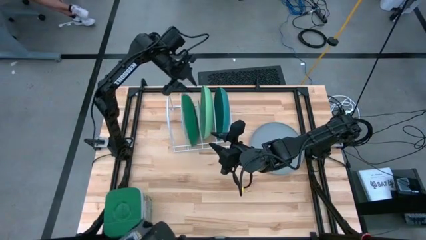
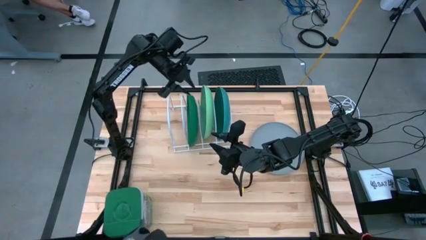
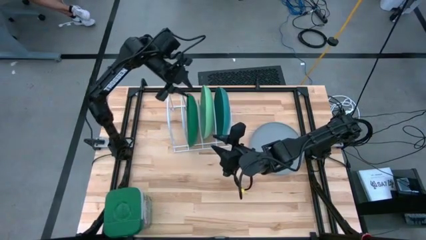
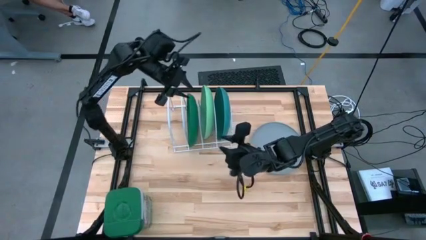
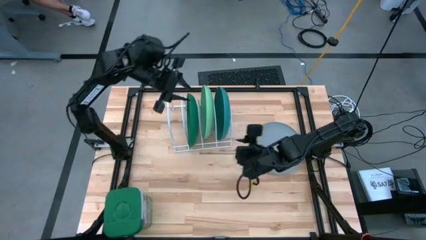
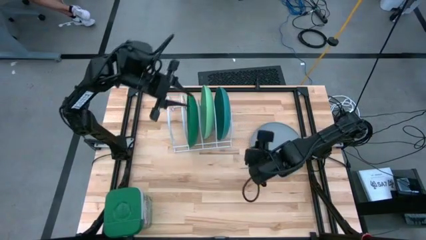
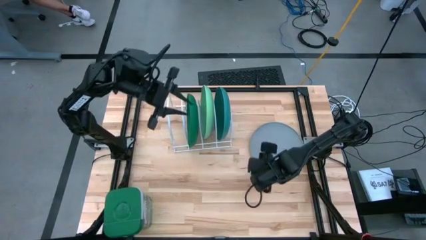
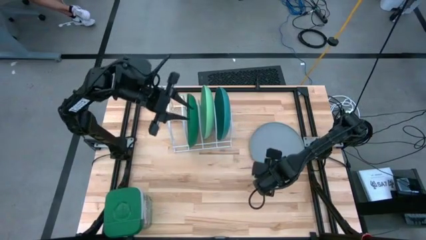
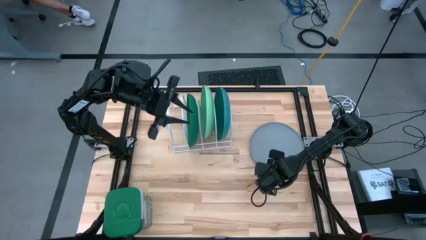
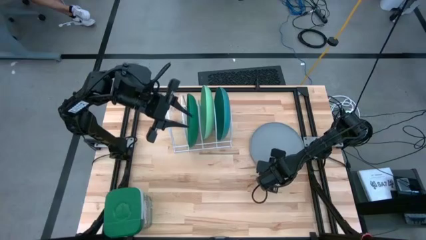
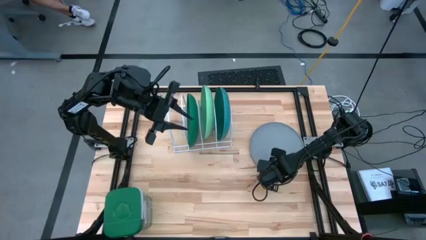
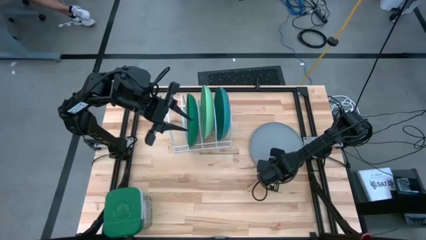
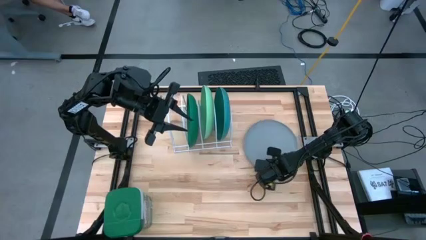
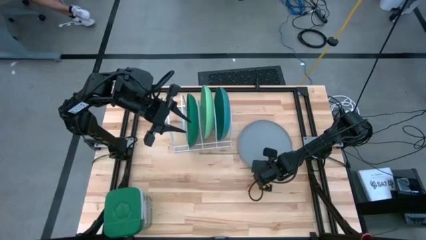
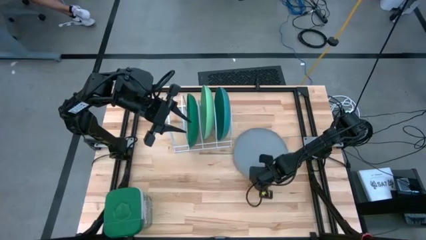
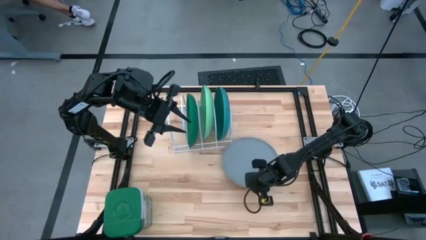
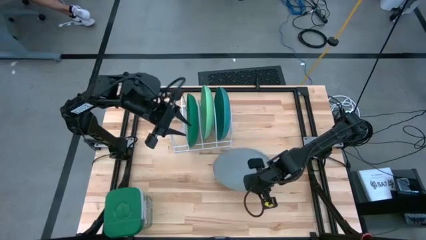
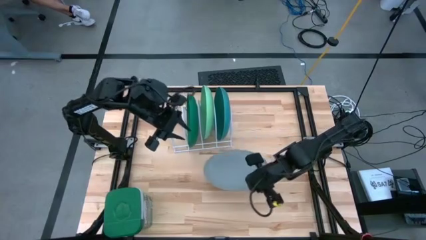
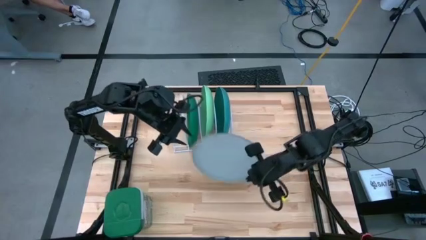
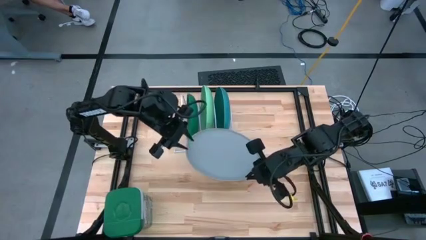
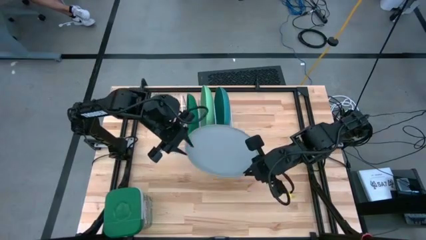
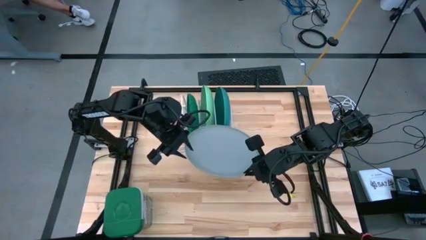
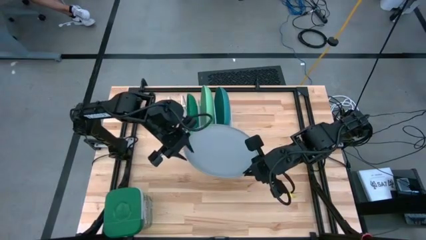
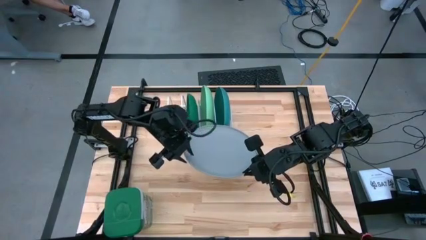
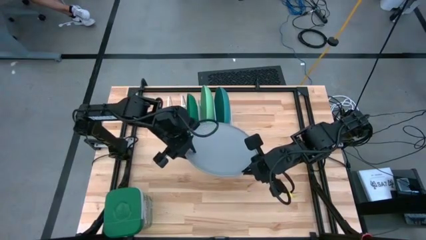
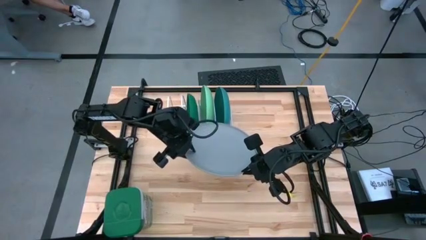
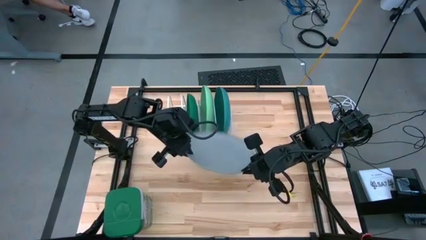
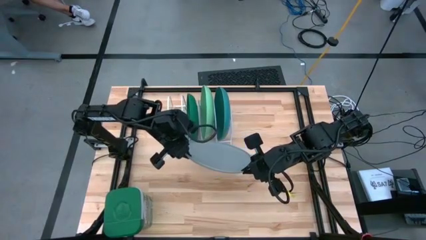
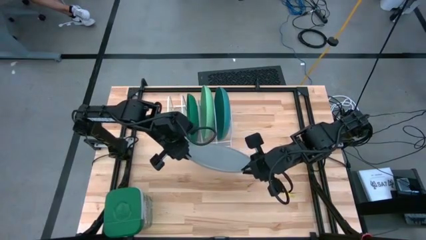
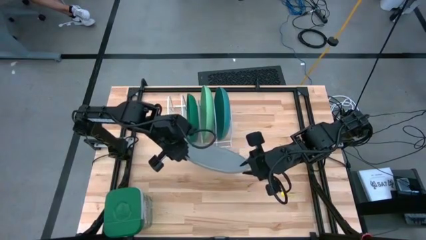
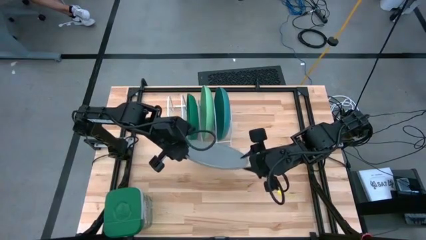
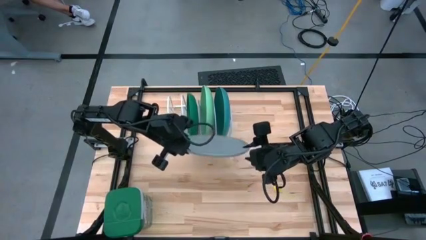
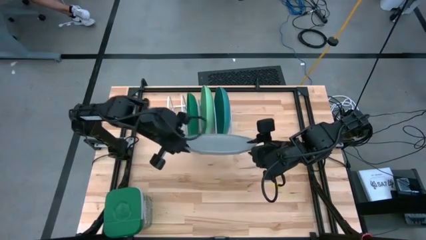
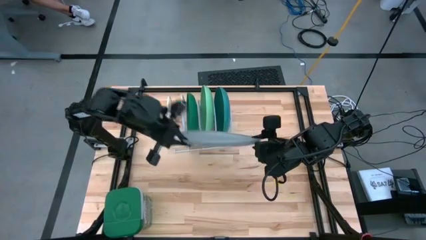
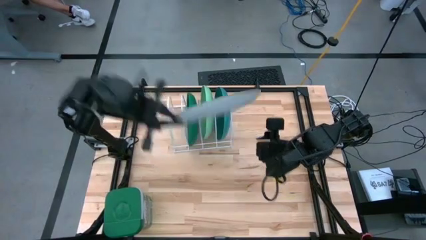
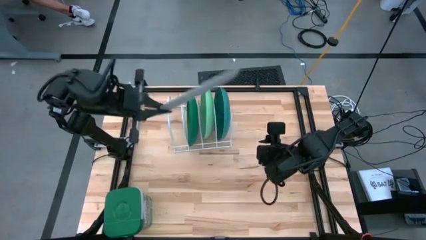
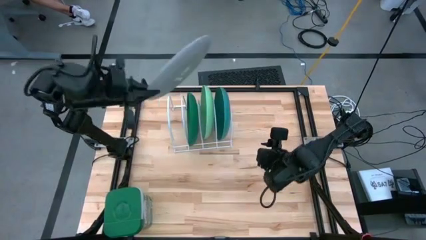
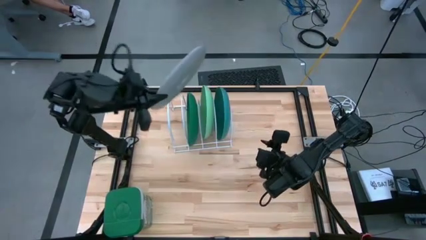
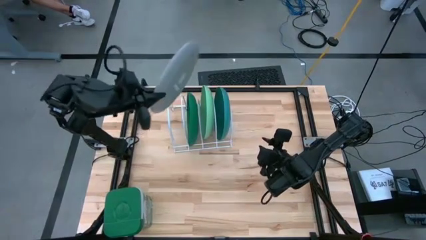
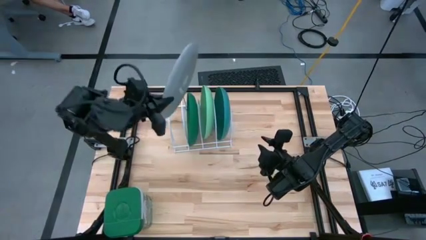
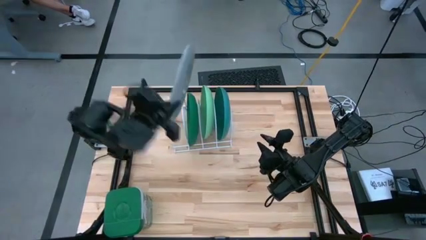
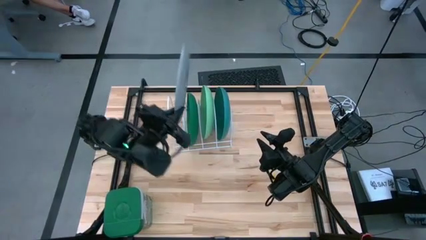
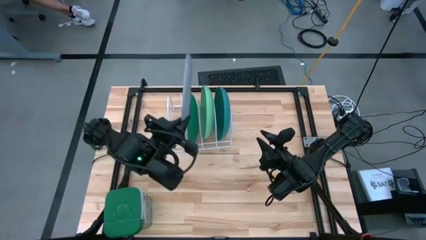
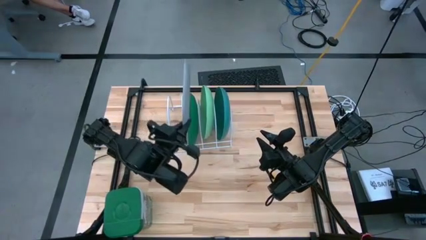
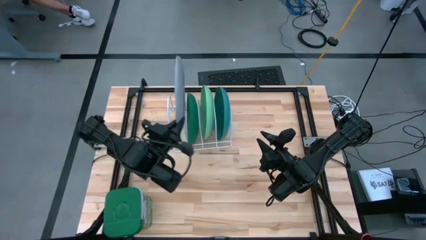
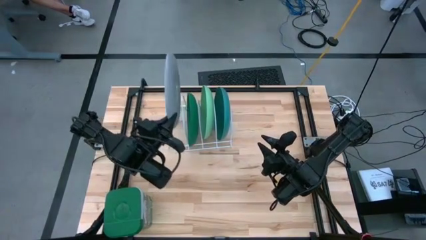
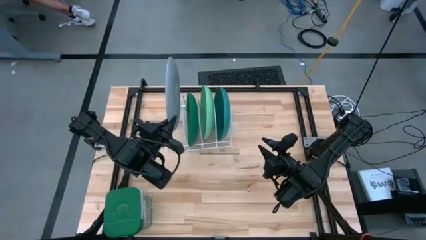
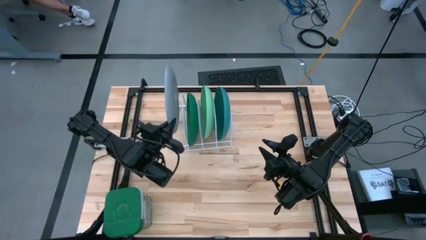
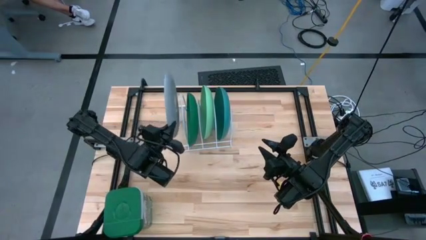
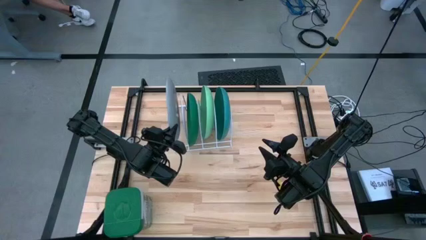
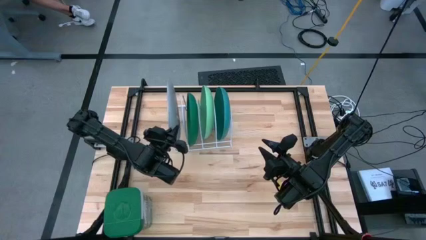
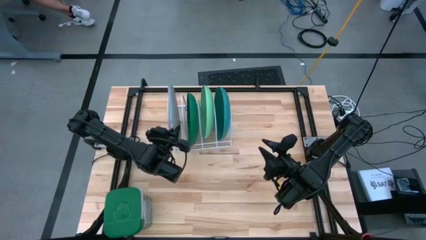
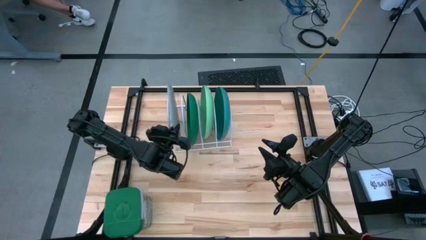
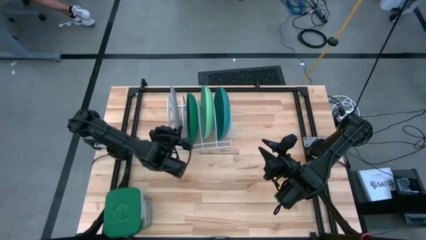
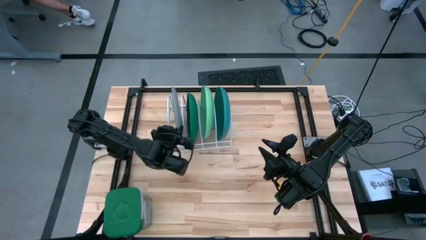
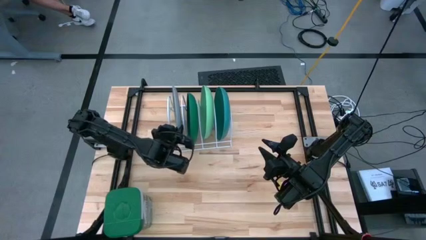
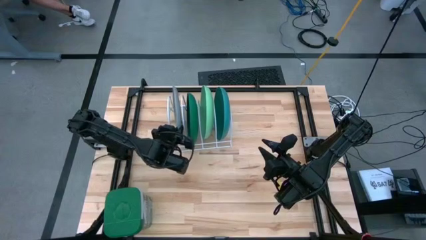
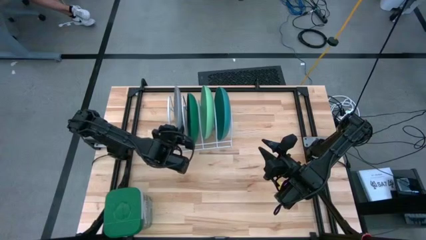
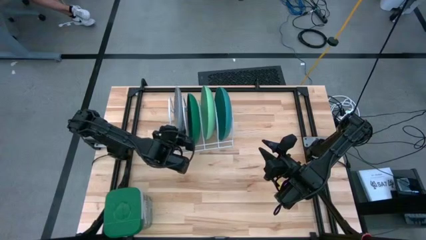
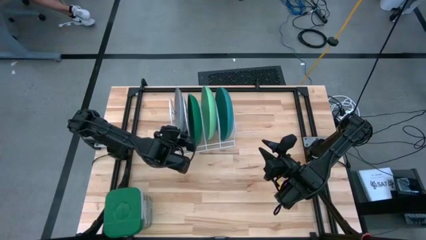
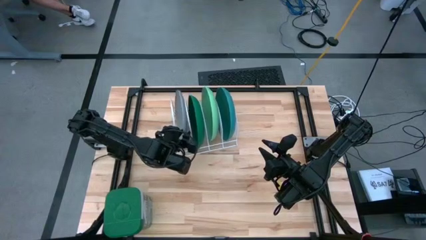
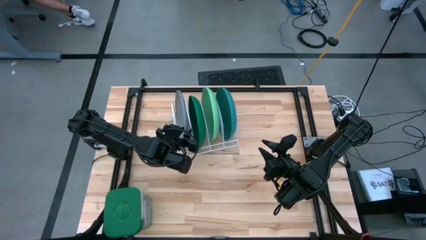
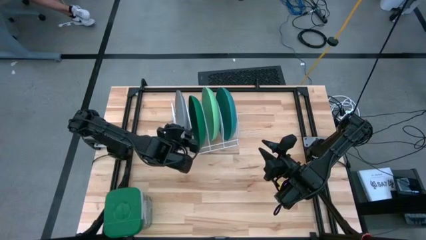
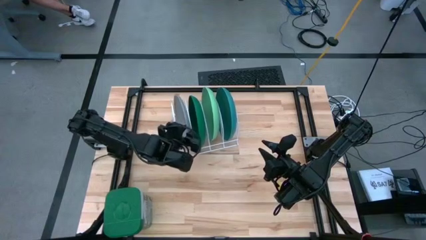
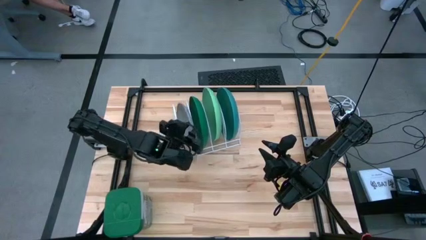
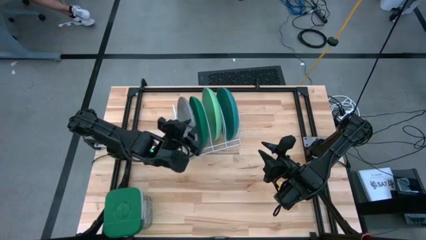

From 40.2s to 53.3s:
Task: Sort dishes
Put the gray plate into the dish rack

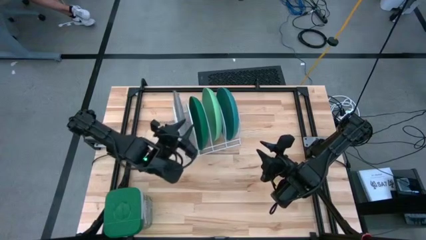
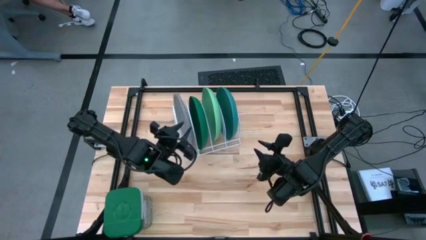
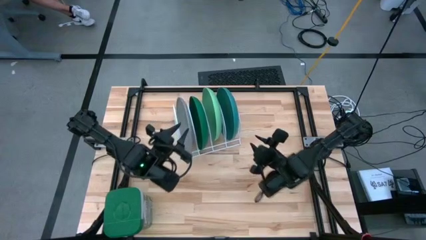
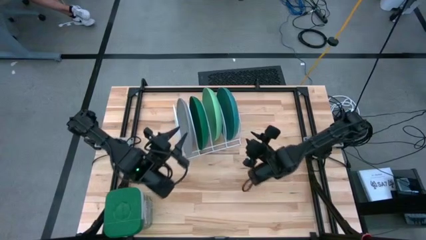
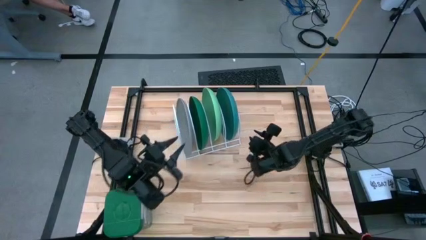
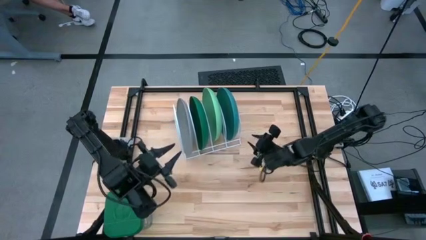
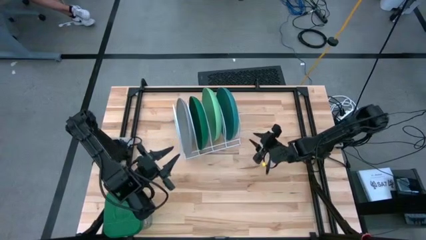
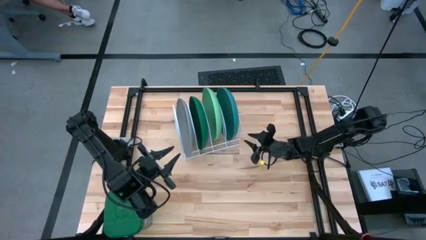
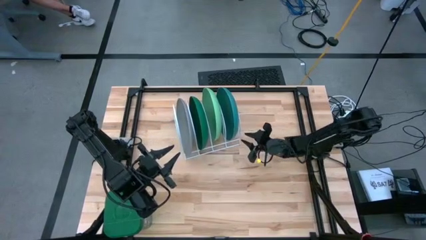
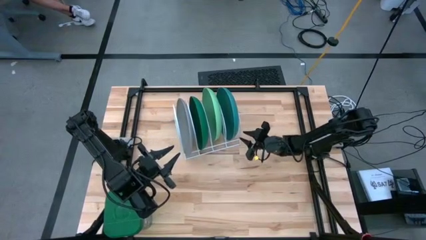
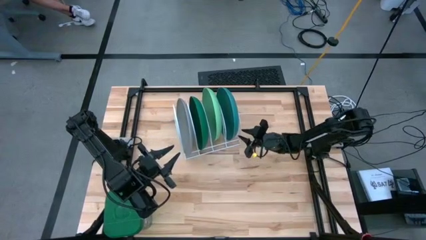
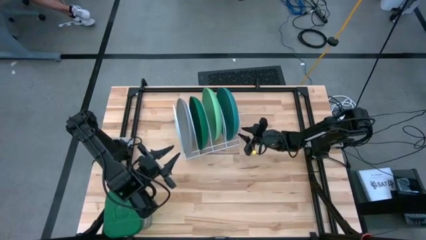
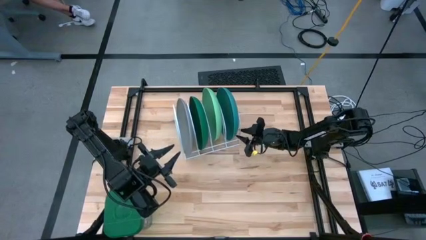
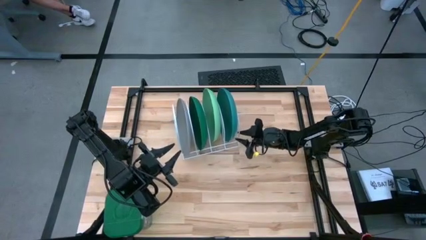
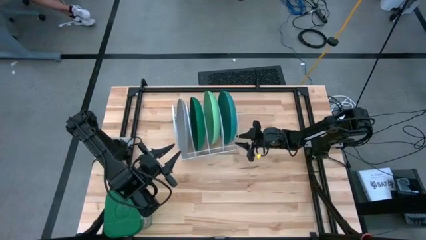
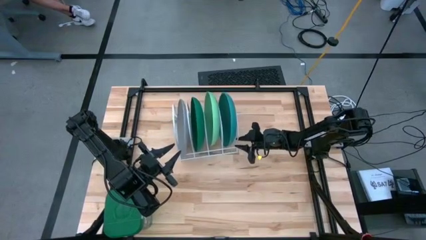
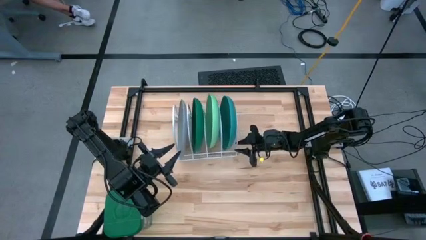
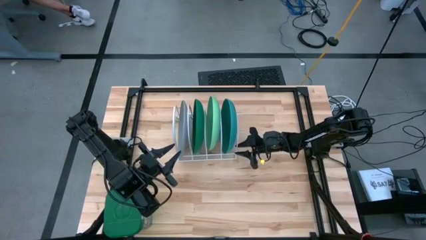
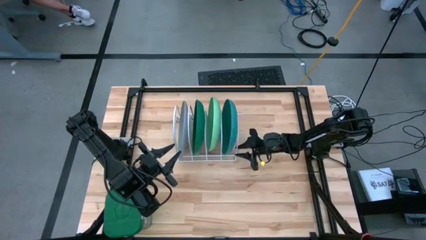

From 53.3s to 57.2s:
Adjust the dish rack
